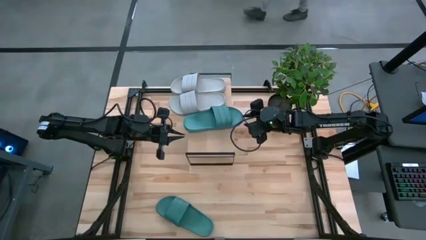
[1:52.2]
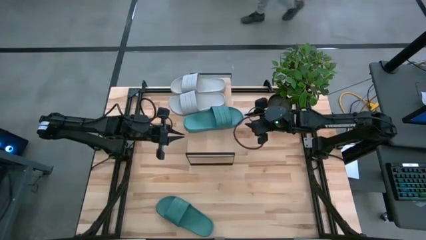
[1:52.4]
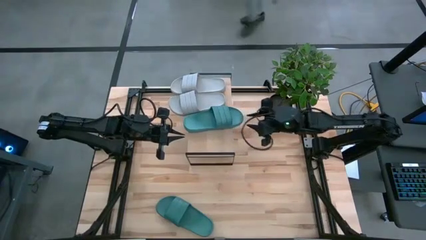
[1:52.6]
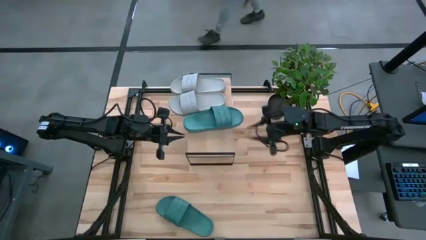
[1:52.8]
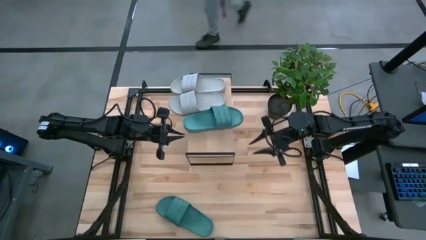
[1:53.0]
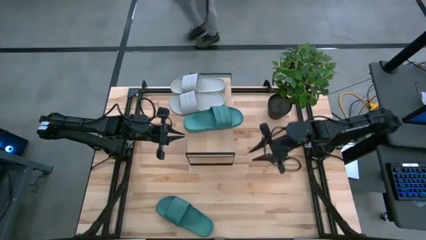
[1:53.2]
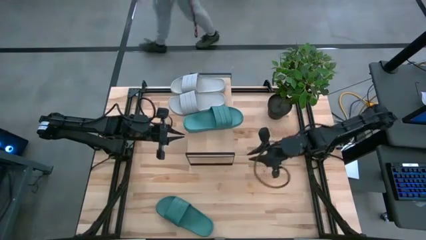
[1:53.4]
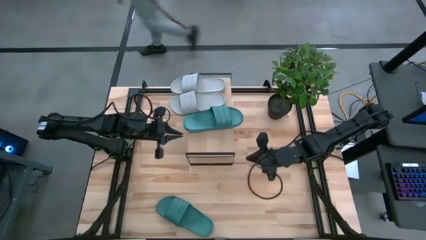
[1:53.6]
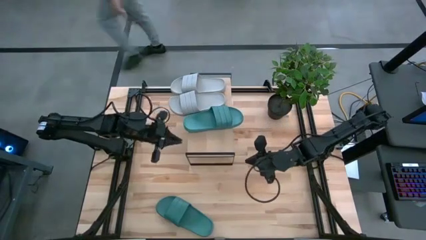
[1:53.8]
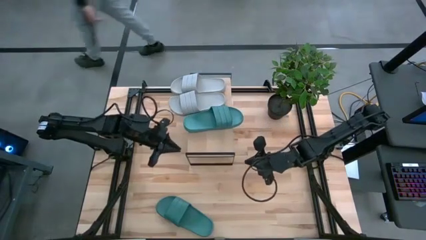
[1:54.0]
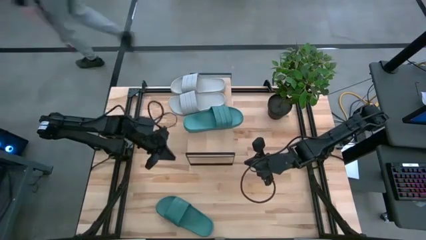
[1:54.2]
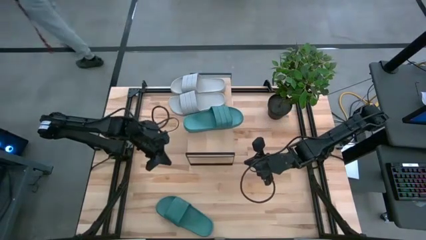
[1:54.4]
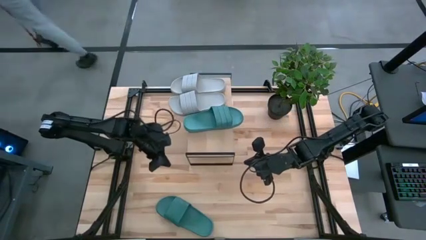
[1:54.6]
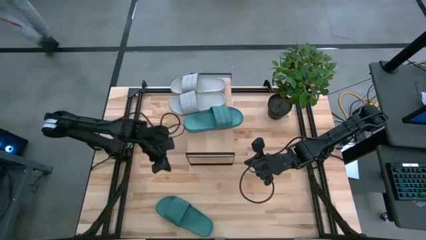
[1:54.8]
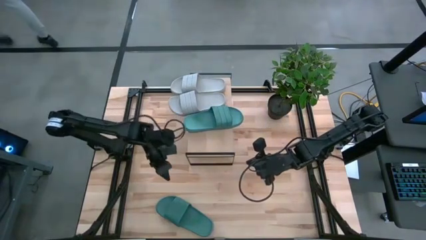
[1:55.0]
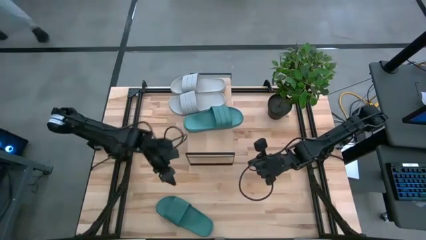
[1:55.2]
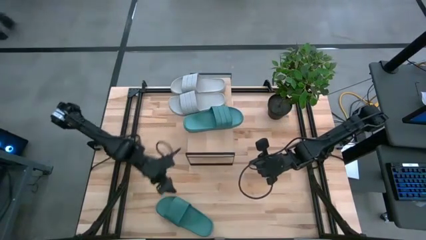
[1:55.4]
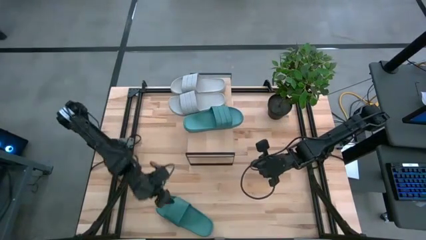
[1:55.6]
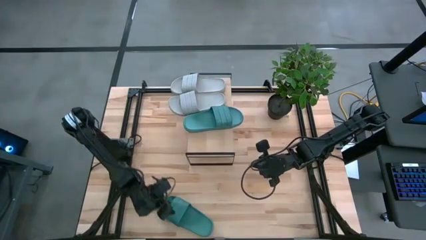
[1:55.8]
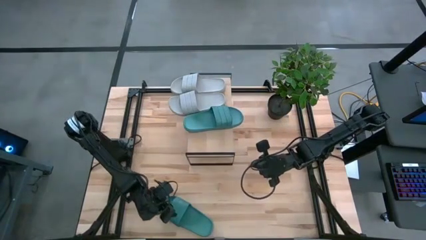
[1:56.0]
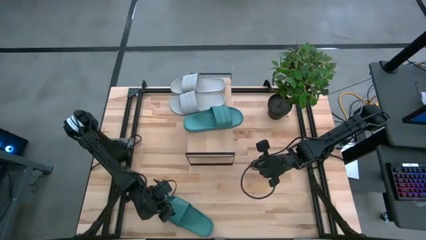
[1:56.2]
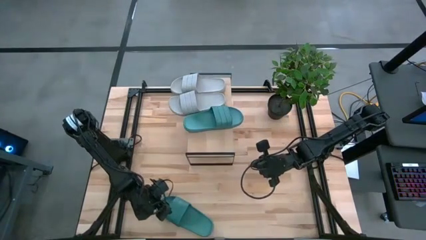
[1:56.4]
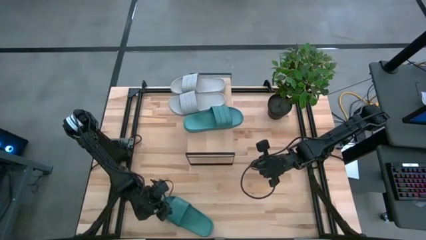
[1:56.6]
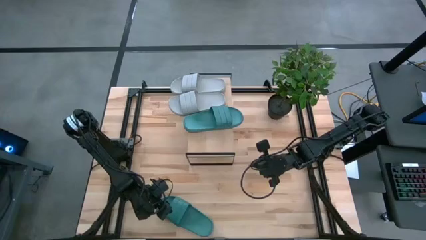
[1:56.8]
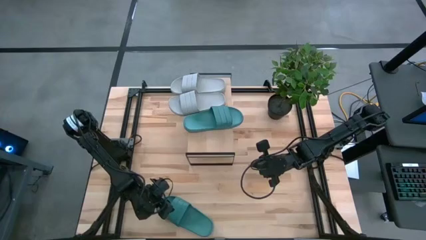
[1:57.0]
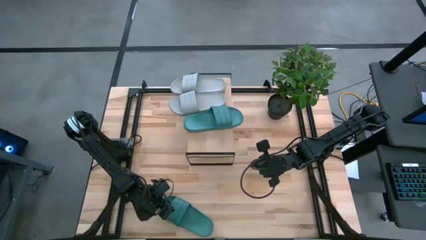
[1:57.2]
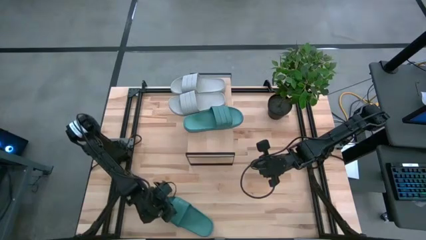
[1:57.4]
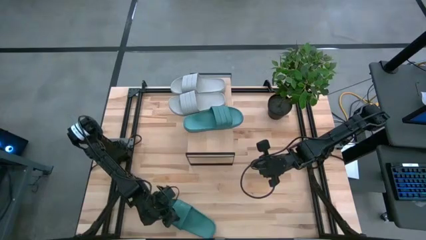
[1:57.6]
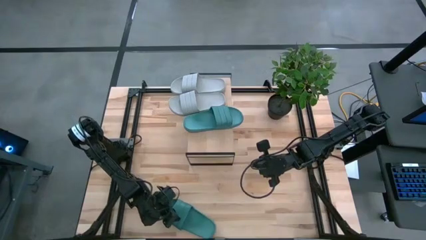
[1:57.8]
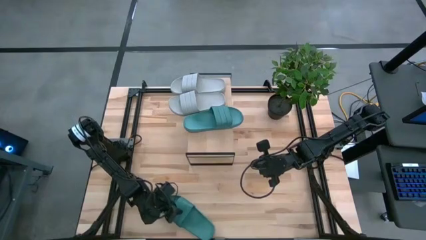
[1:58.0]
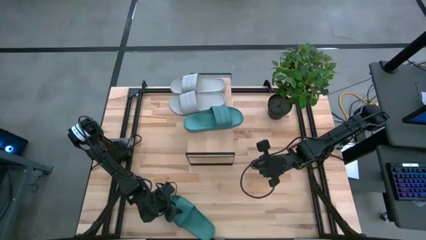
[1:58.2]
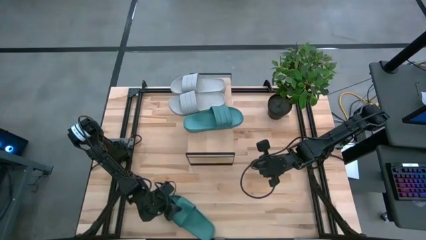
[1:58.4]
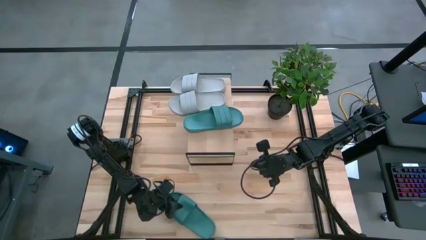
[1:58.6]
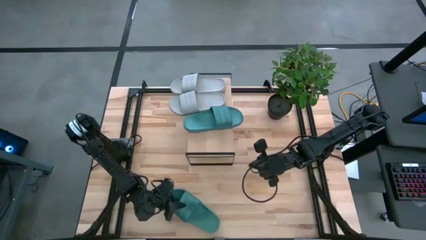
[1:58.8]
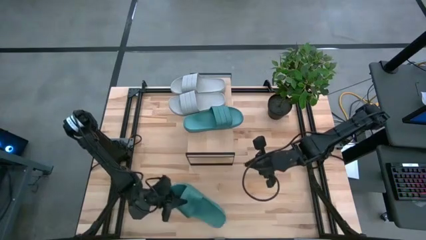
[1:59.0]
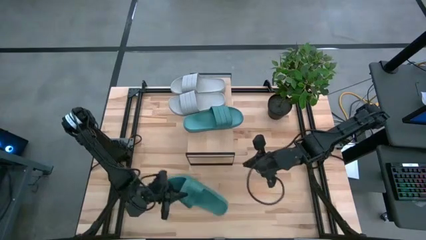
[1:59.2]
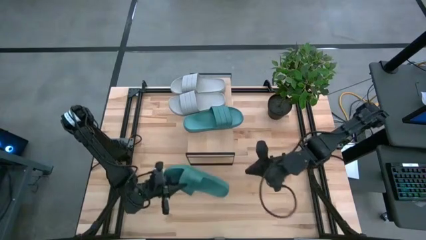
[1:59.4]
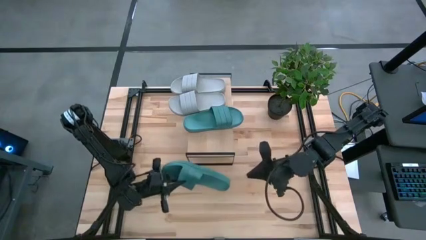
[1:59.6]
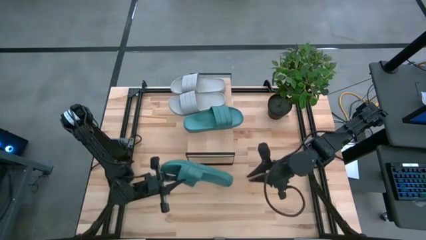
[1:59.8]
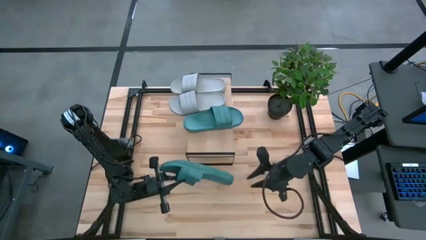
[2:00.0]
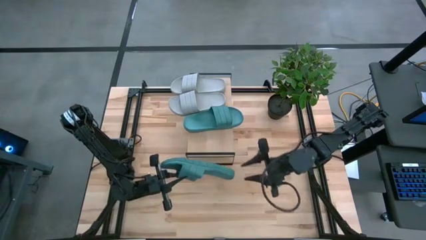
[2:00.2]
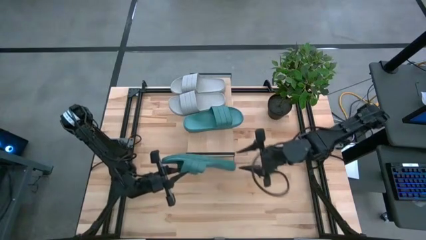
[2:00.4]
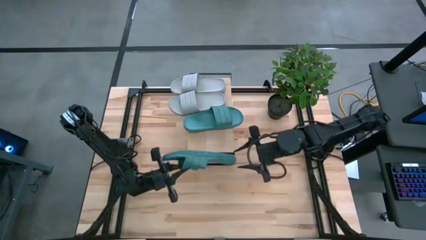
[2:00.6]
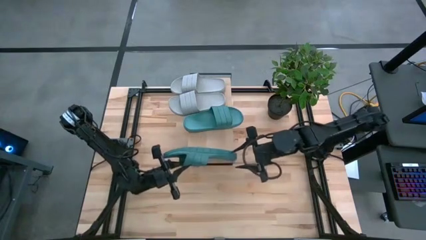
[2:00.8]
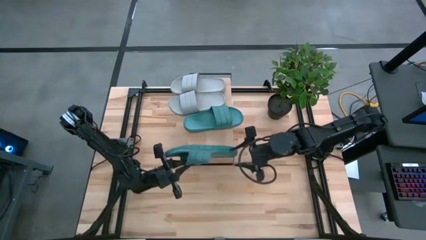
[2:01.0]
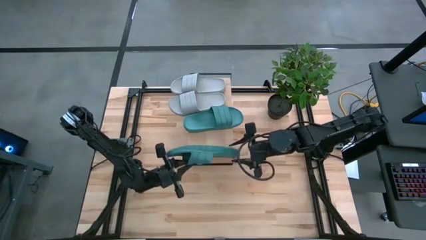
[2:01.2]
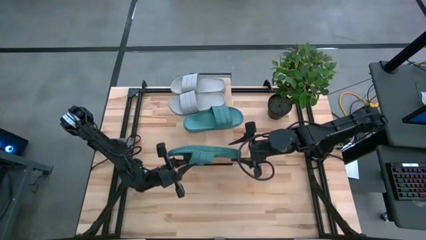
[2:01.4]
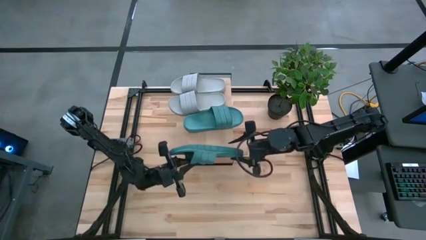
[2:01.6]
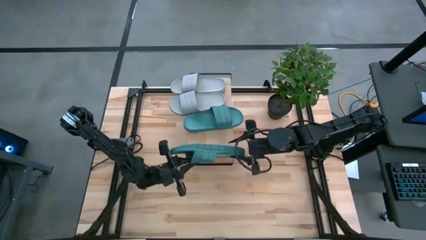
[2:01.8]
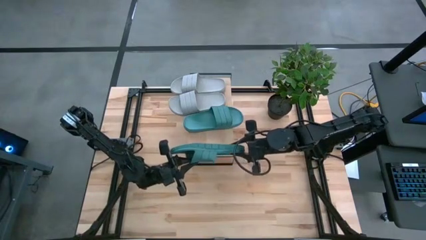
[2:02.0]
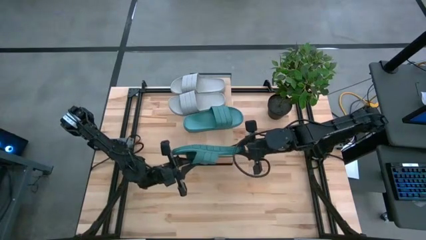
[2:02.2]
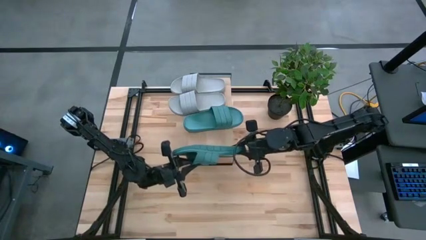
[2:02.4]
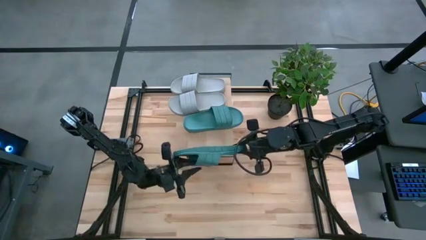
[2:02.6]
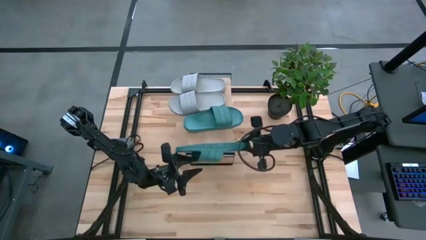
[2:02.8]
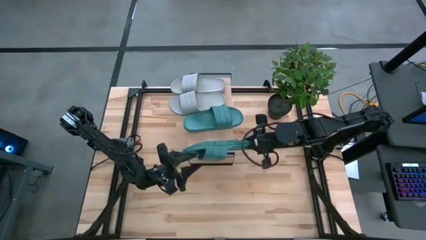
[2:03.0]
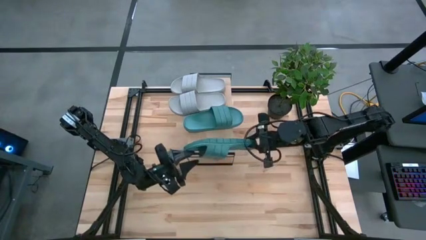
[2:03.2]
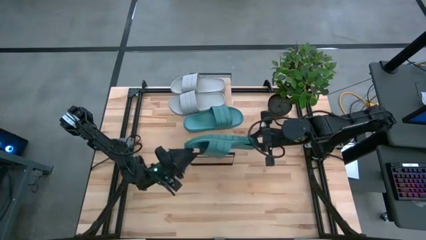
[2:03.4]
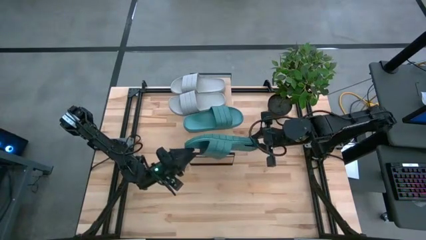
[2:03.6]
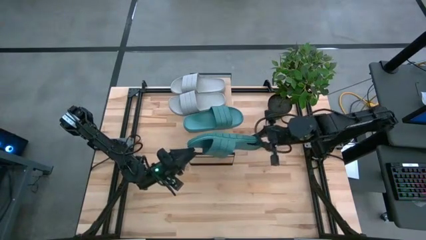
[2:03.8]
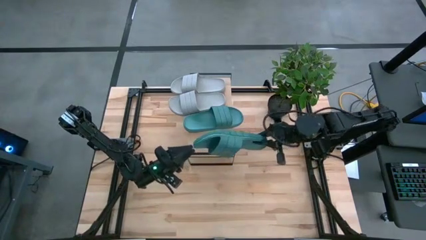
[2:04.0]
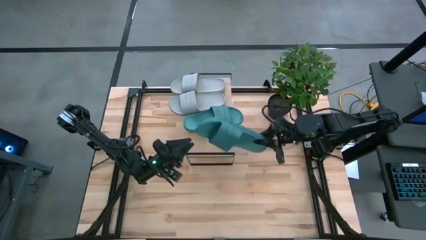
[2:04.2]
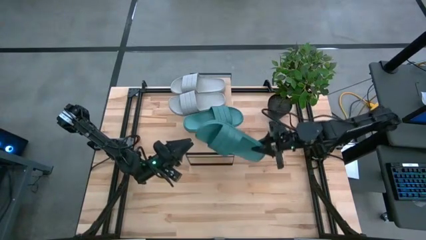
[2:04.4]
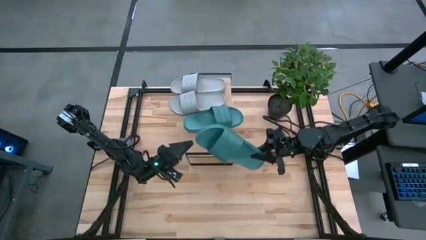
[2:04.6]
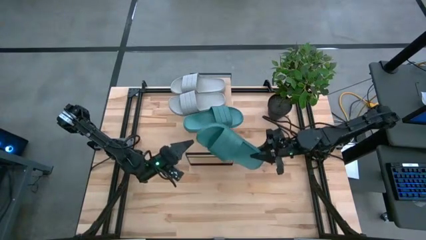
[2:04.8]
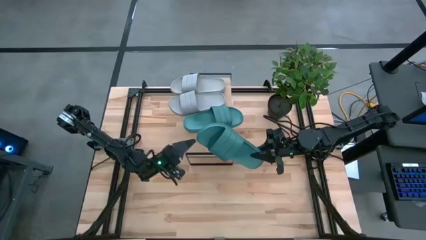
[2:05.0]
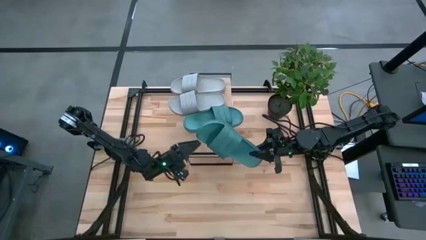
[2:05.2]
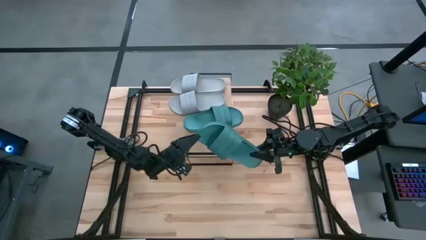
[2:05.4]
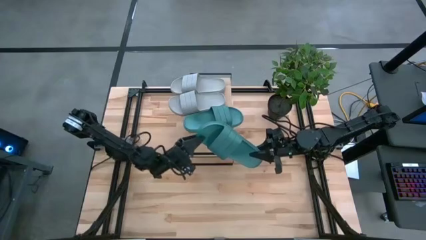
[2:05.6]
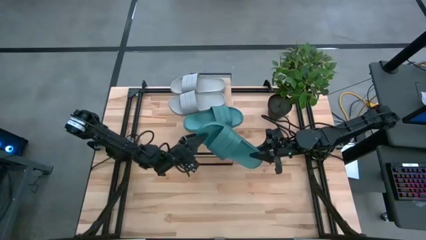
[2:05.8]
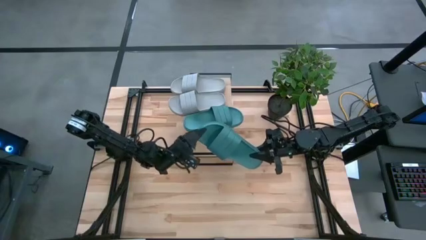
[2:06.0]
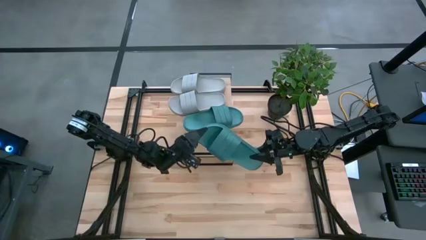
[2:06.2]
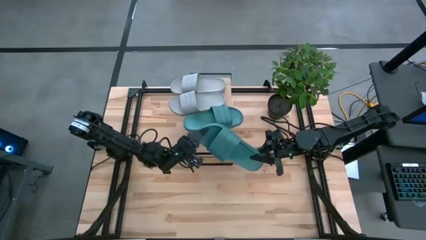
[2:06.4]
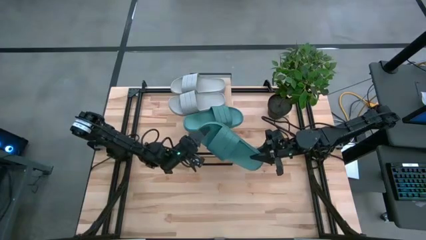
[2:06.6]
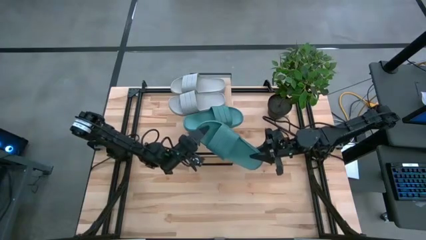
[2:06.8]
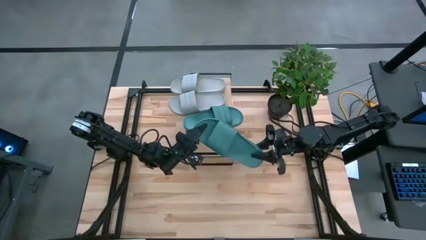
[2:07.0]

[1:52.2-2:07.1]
Task: Pick and place slides into the shelf
Put the blue slide on the shelf

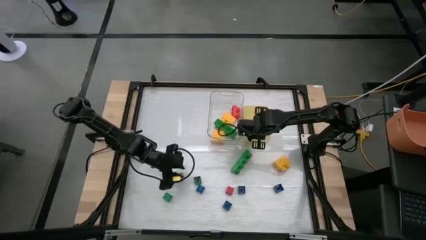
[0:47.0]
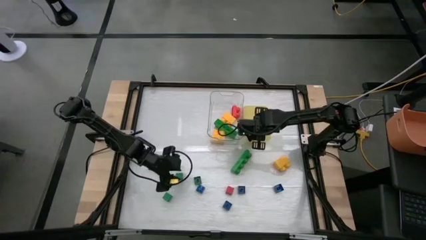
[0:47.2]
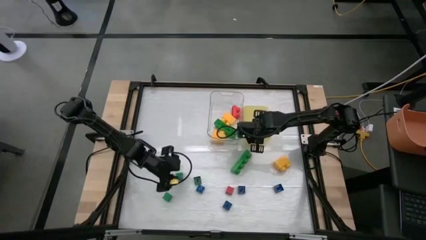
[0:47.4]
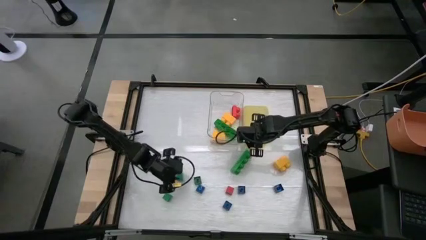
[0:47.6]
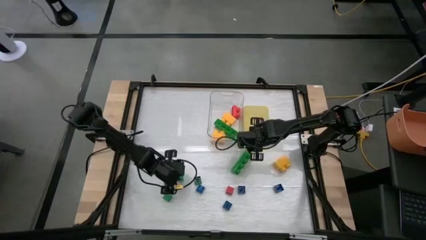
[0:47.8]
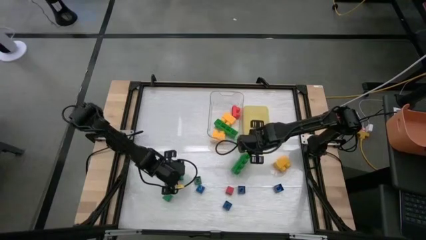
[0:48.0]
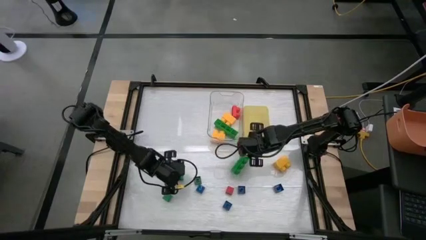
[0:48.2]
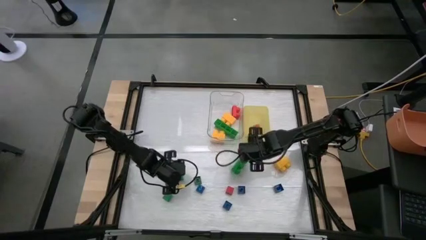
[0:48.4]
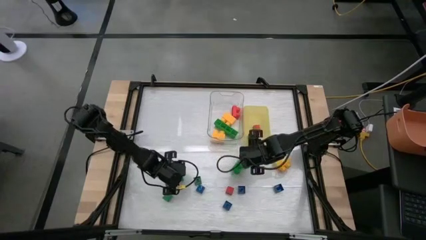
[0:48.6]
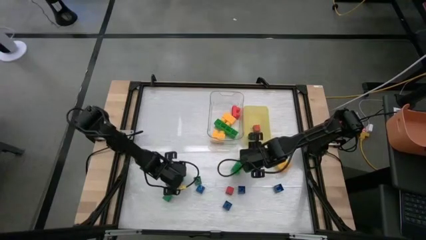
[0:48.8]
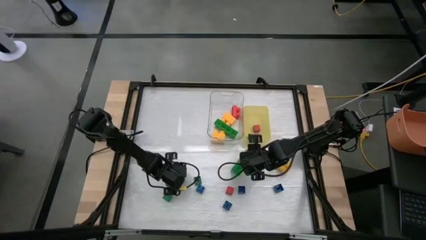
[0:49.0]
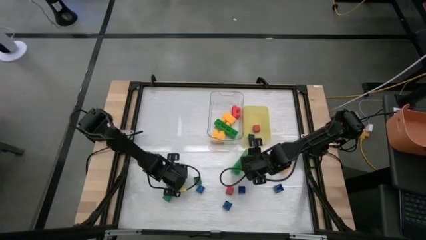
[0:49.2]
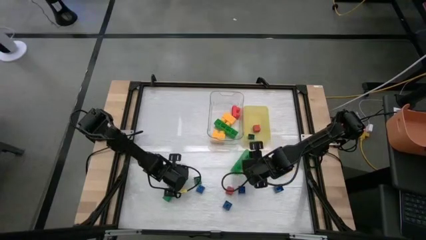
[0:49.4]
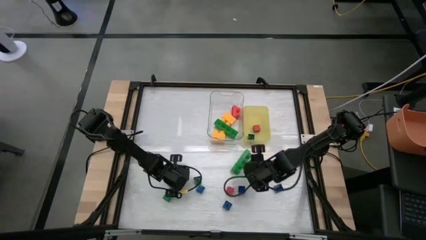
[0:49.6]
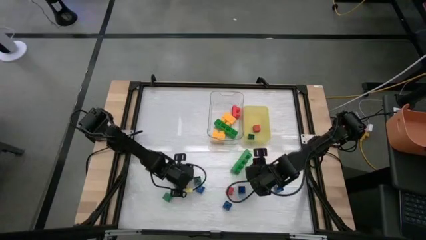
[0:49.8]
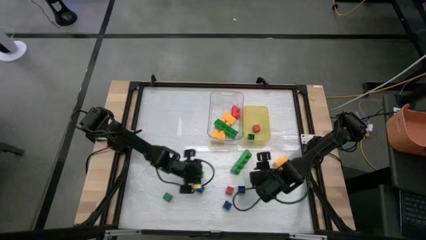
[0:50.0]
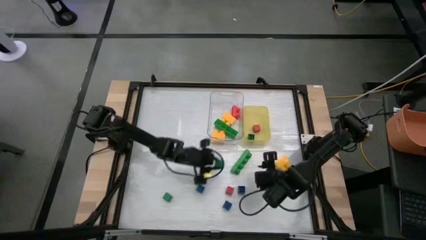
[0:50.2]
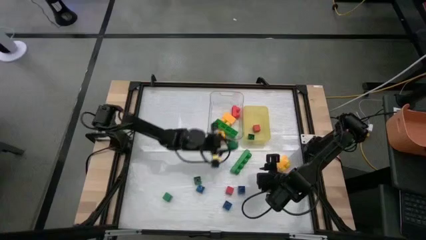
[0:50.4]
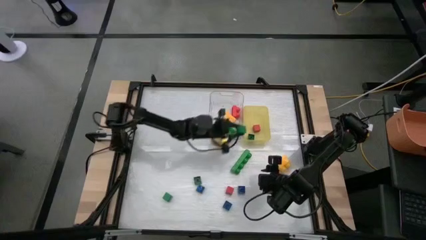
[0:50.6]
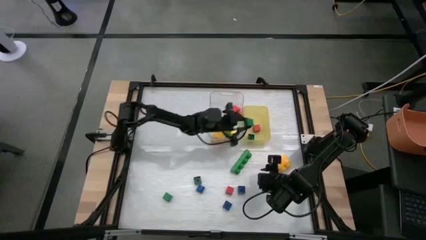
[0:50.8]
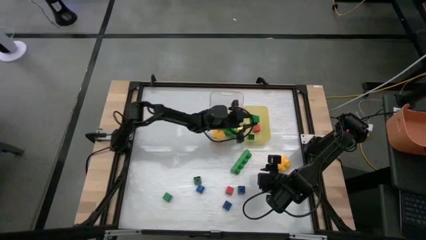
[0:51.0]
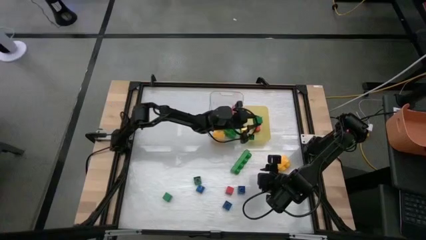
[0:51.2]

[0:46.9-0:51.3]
Task: Sort blocks by size
Put the small green block into the yellow bin
